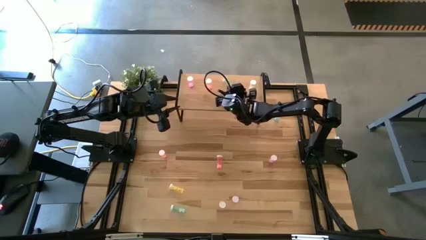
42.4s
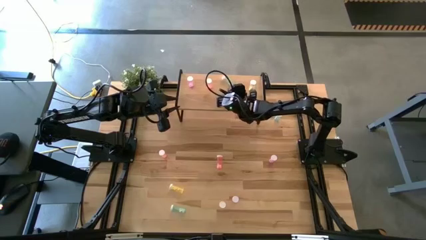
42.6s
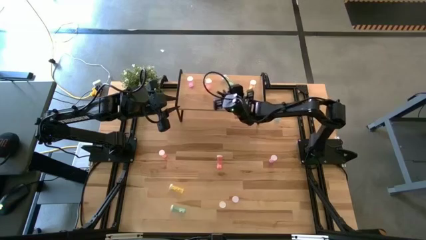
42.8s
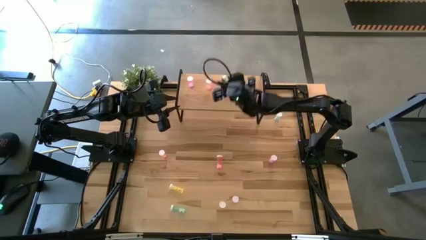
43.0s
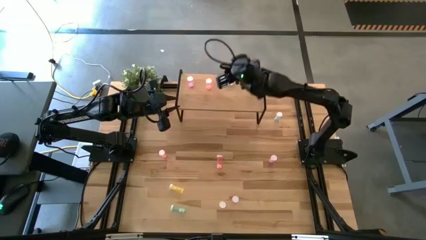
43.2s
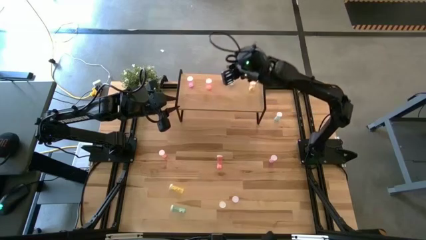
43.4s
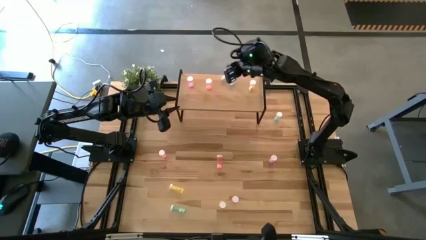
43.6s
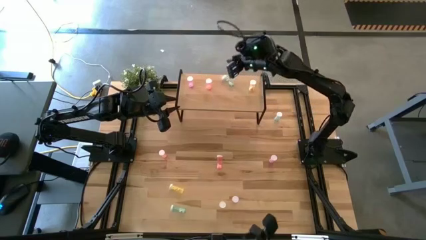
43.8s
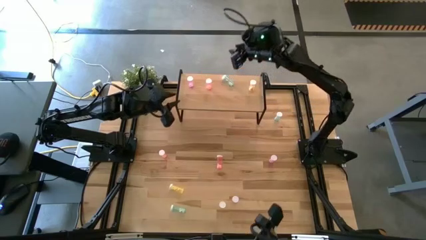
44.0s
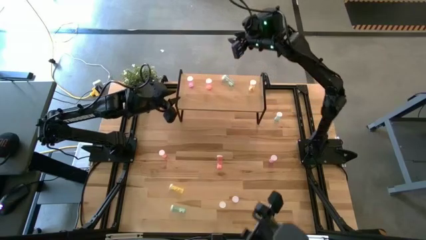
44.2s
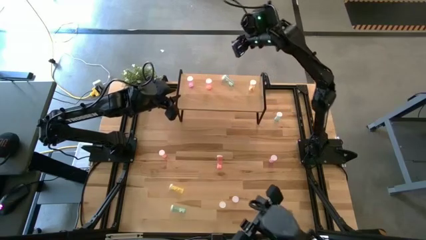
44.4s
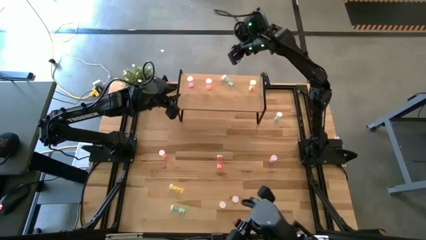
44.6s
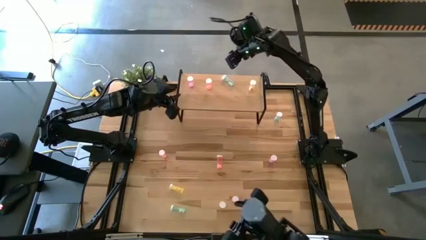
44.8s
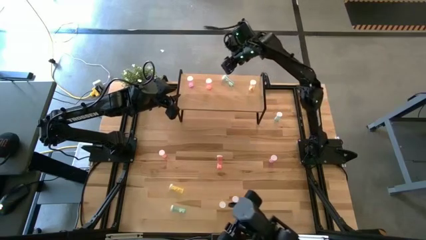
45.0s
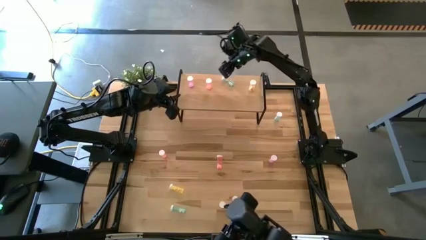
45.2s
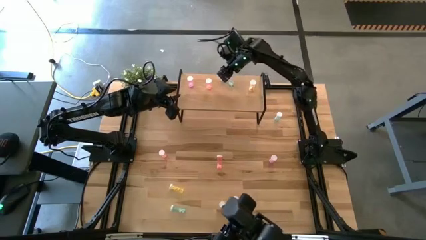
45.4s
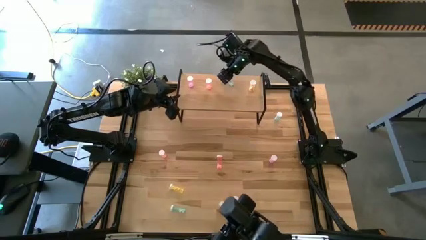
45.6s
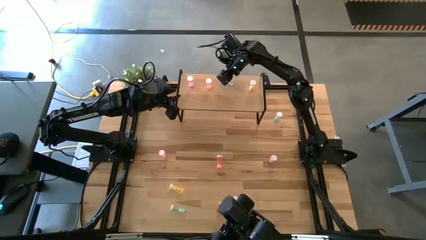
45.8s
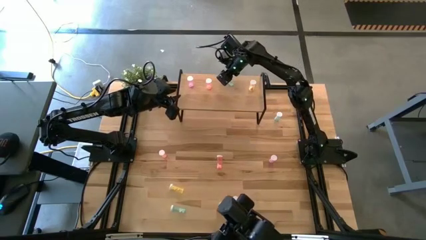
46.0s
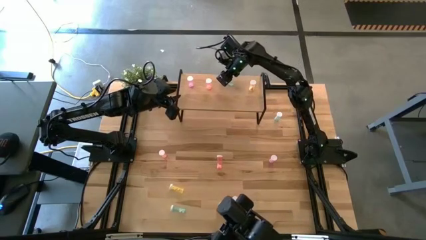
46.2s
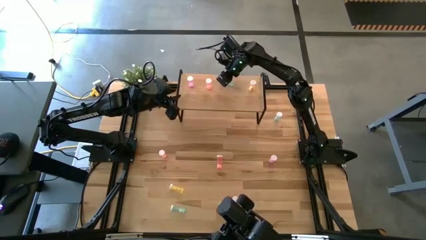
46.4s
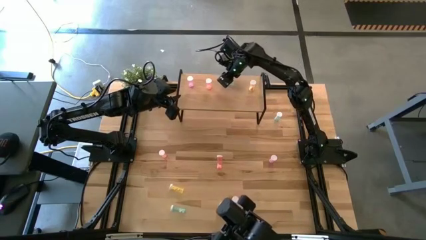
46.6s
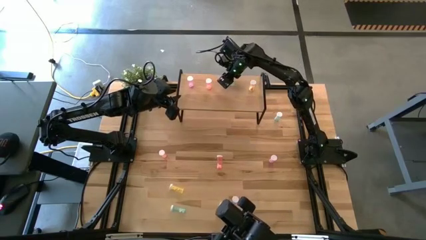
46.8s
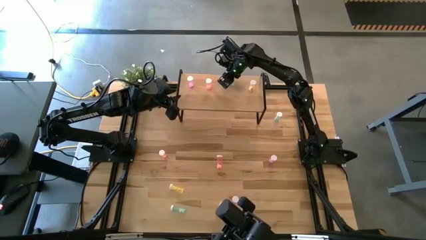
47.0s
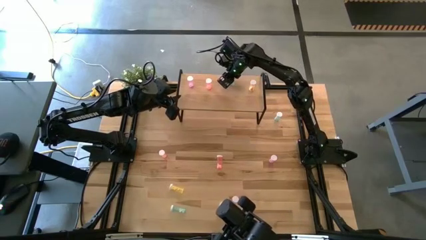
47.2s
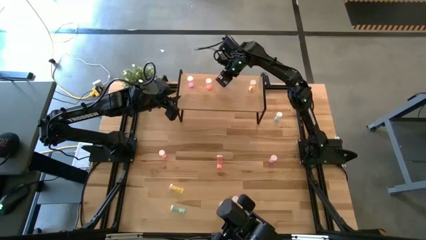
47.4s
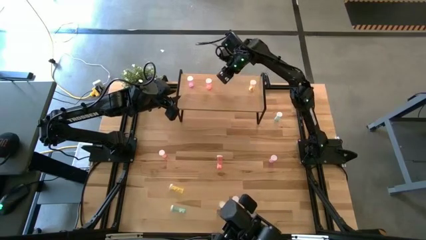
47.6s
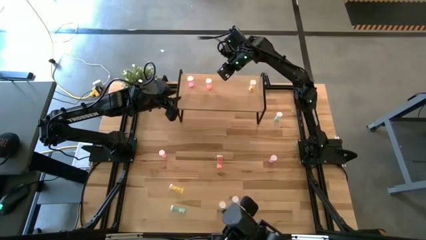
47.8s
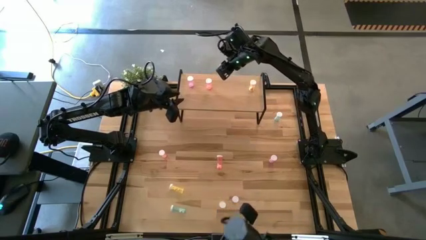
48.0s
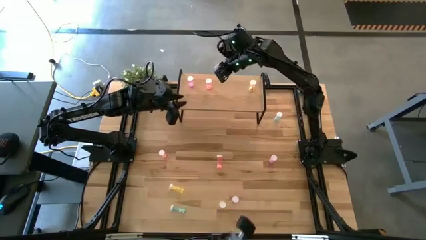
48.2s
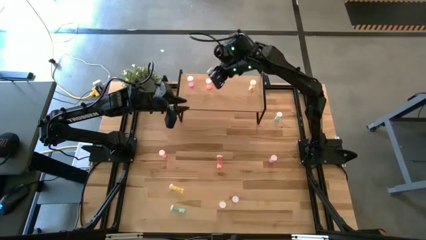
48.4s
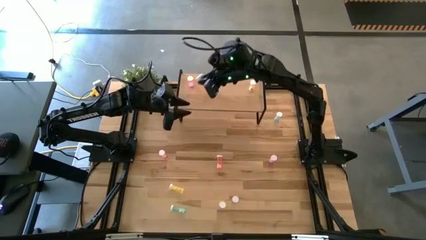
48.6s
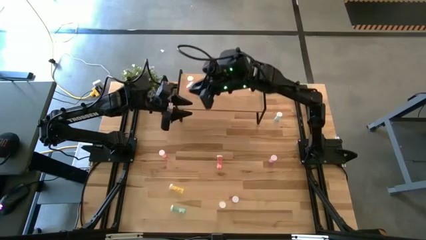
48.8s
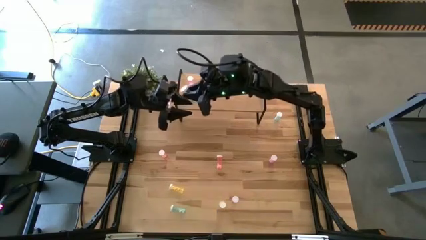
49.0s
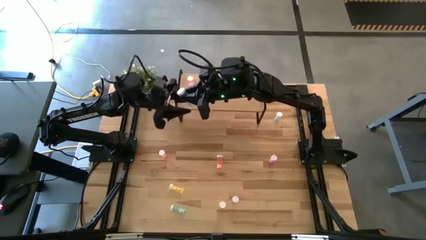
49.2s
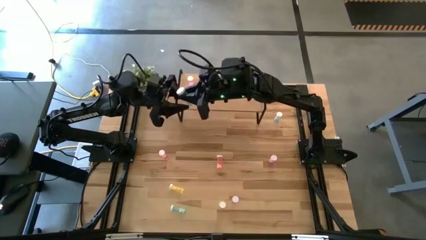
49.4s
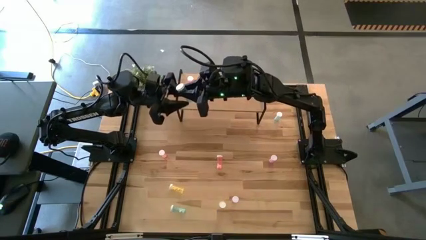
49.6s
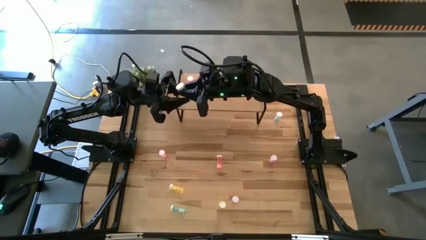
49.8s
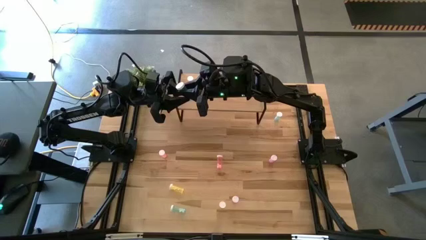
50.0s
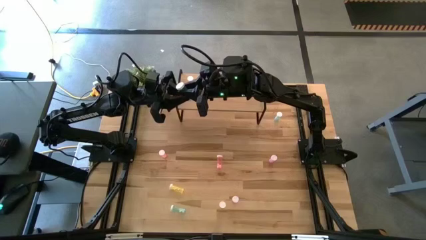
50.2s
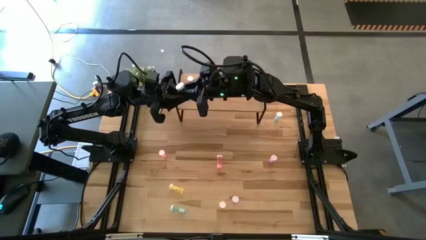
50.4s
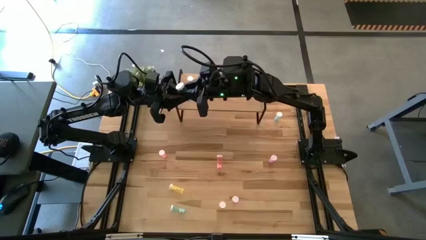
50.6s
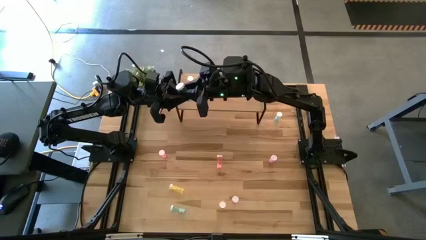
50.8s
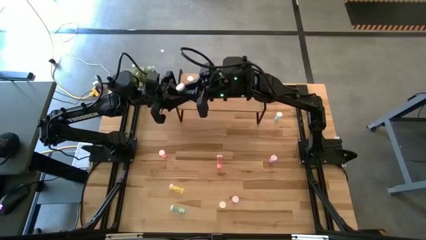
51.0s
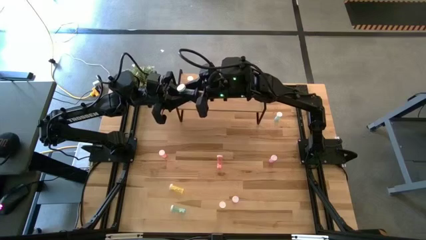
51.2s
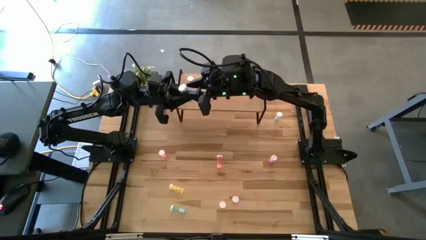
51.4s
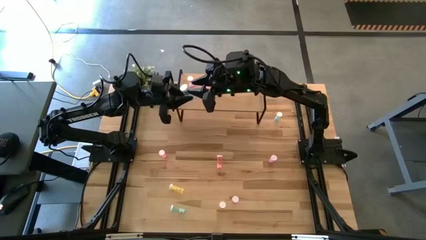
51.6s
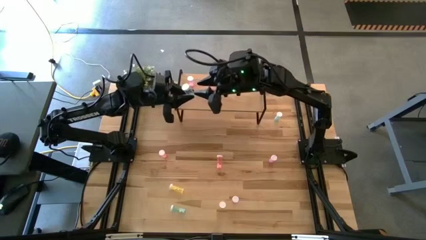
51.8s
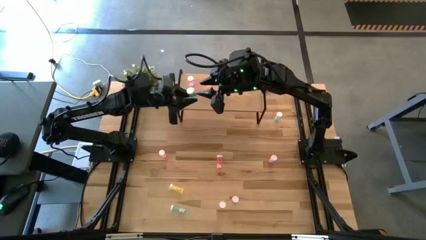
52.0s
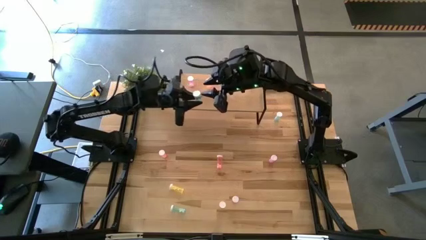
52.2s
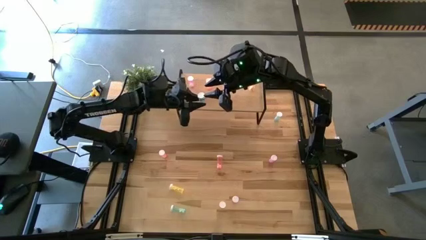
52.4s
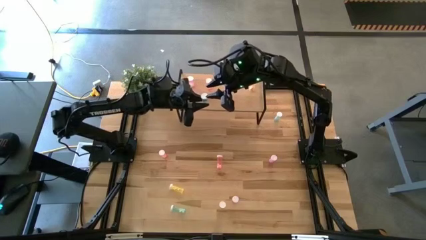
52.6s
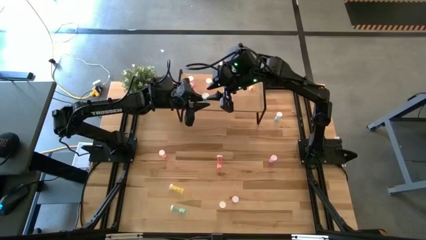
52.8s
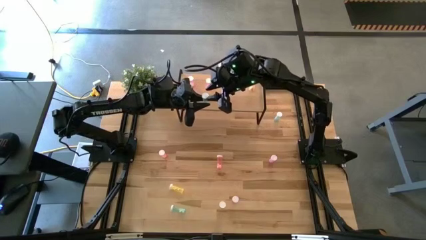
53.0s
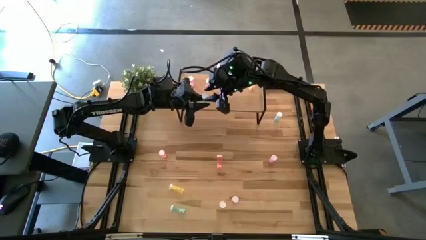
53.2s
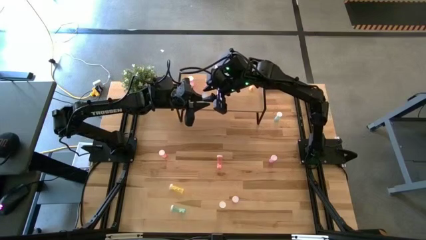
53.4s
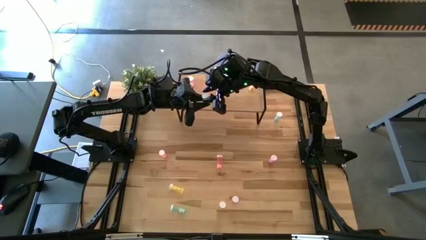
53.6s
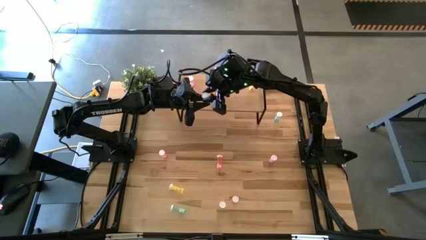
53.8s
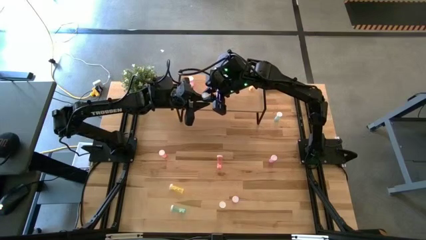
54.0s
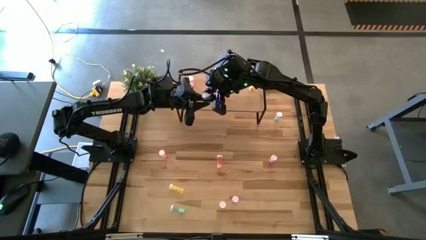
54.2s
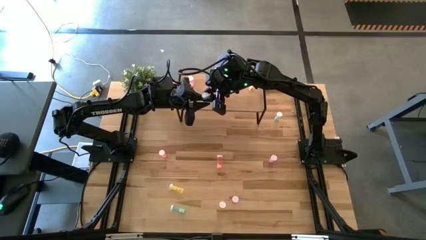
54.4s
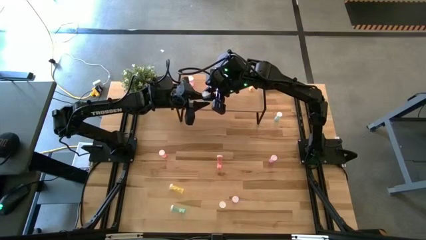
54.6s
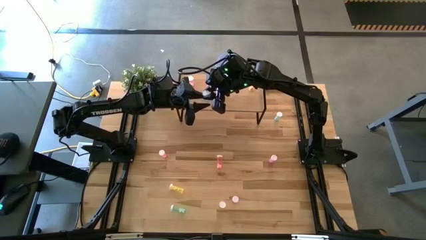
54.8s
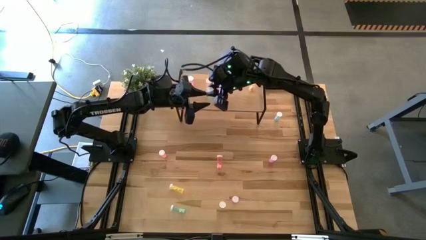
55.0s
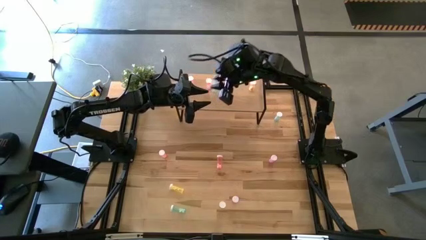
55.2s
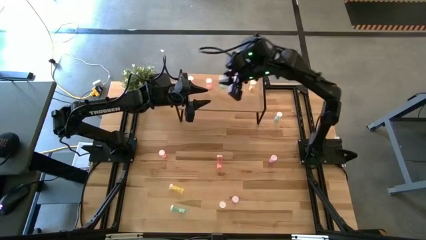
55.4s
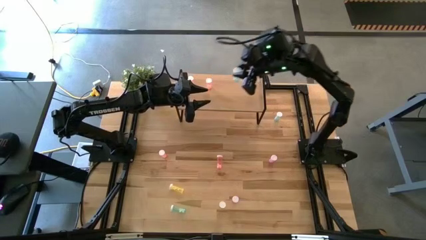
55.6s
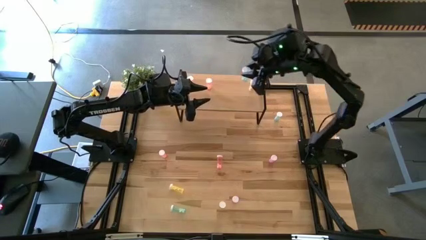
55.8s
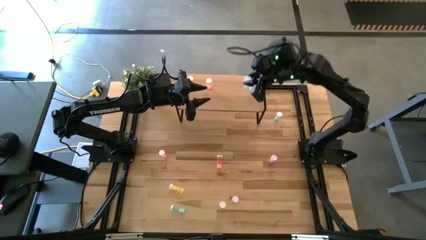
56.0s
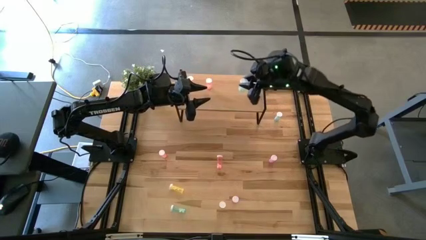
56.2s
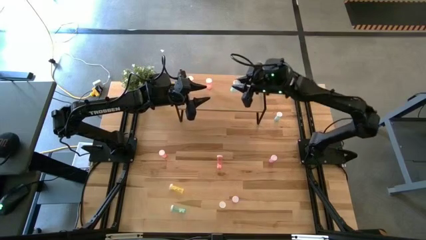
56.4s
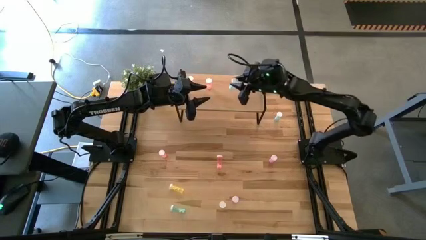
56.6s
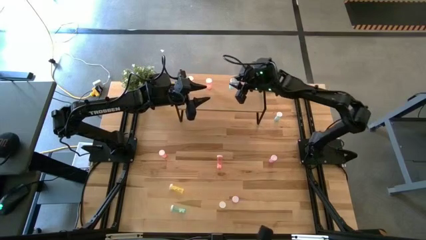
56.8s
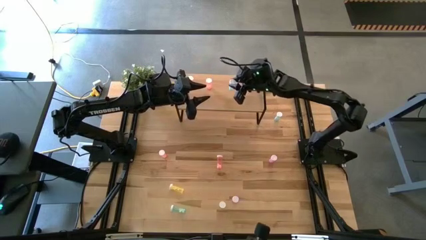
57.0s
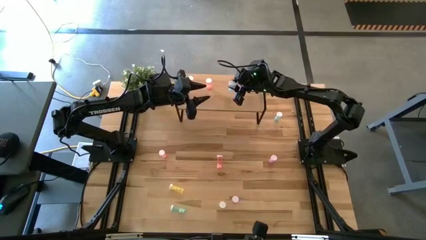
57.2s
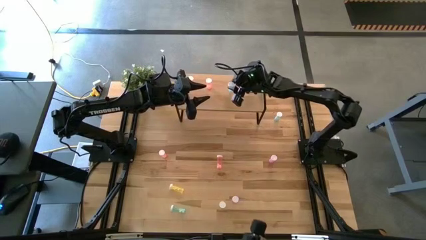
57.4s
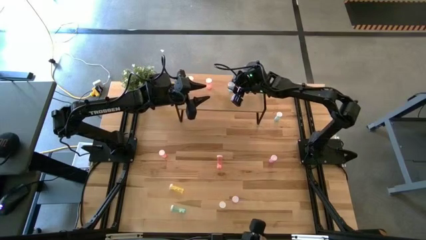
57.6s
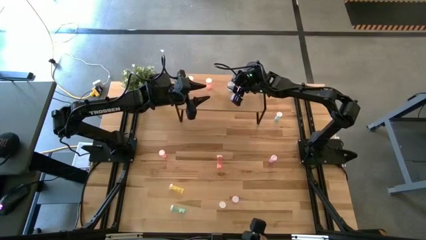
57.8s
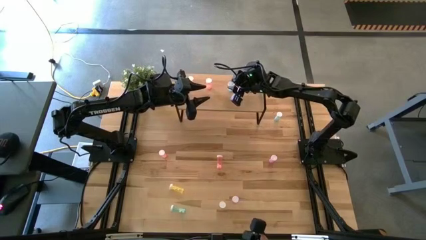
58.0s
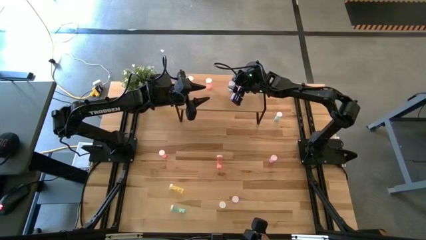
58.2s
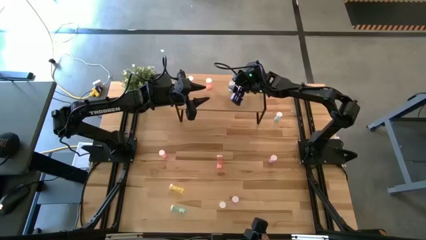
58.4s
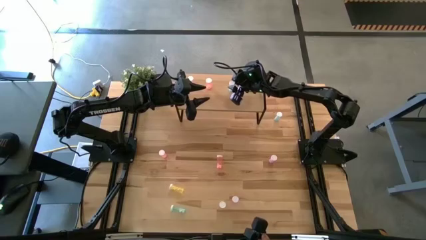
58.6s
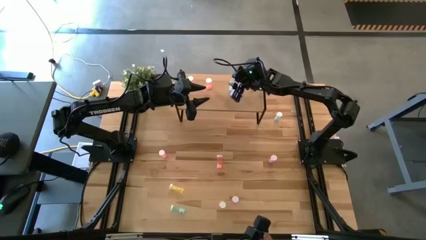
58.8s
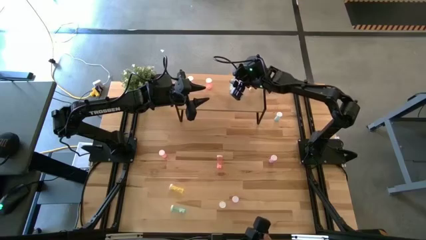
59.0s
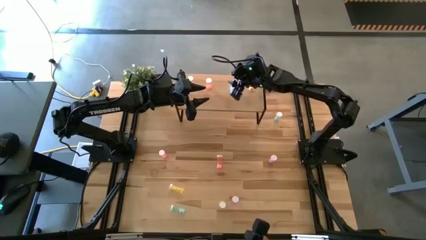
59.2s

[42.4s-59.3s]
Task: Pick and place medicine bottles onto shelf by color
Put the top blue pill bottle on the shelf
